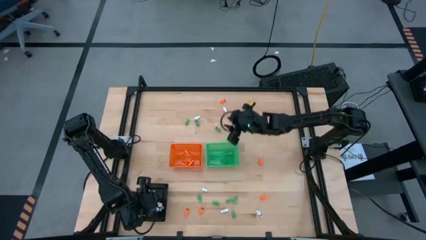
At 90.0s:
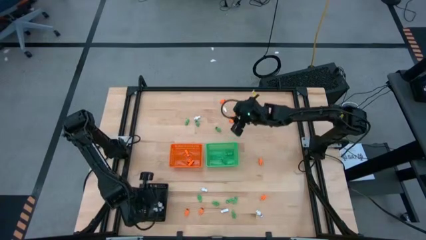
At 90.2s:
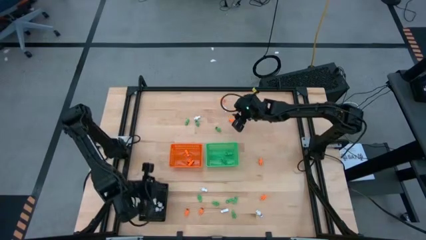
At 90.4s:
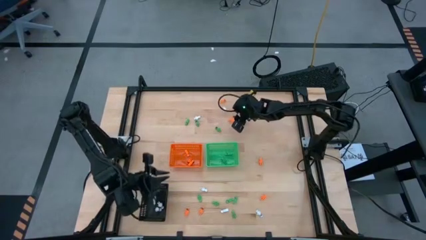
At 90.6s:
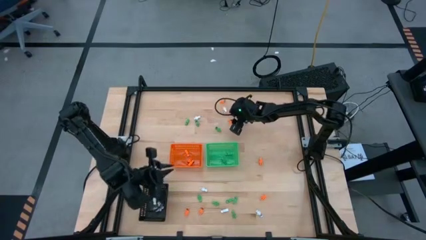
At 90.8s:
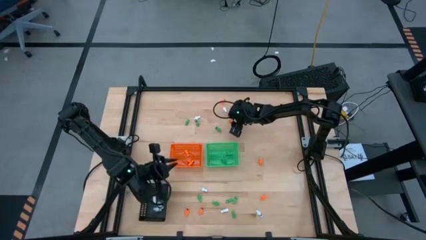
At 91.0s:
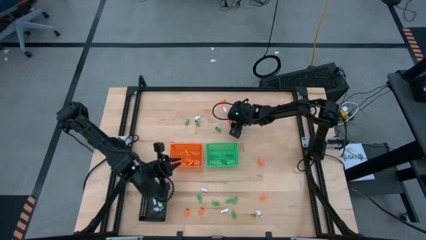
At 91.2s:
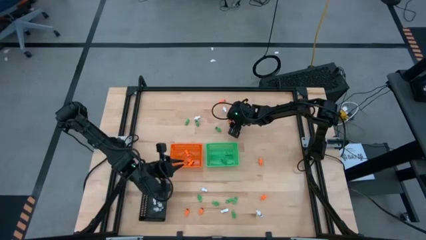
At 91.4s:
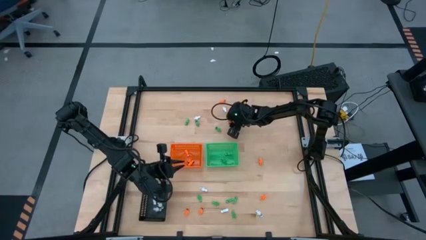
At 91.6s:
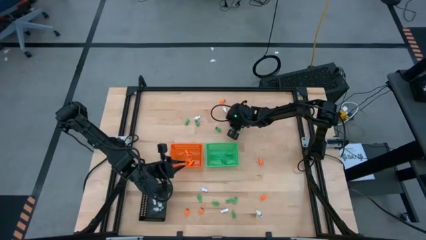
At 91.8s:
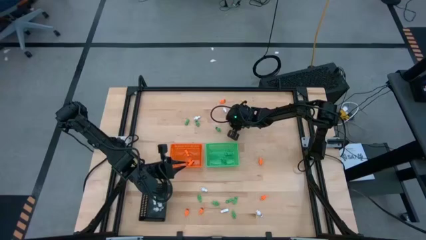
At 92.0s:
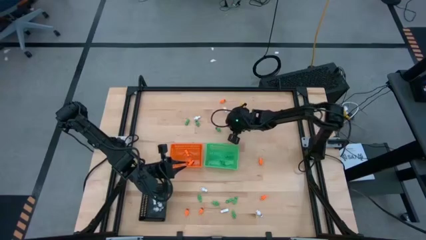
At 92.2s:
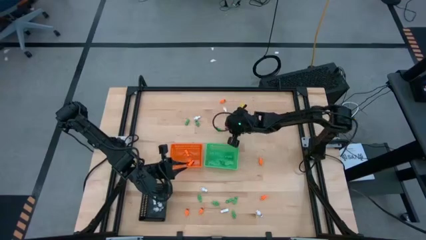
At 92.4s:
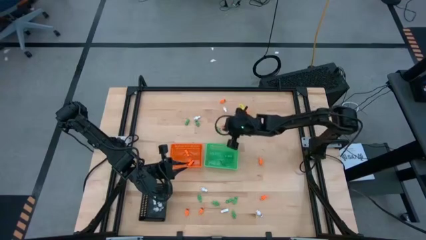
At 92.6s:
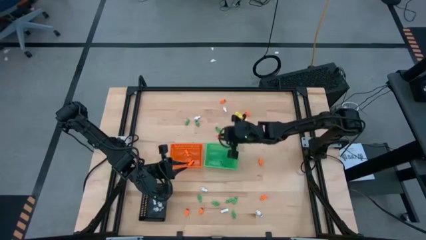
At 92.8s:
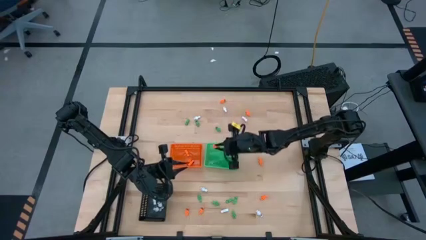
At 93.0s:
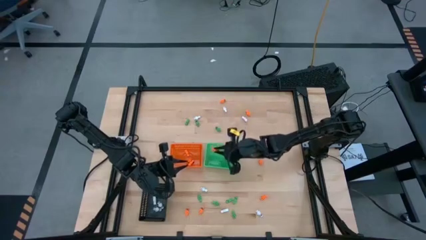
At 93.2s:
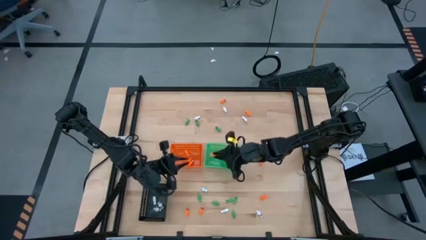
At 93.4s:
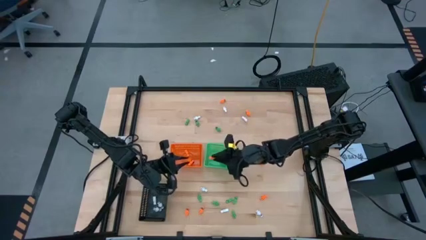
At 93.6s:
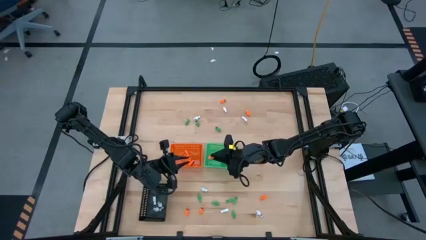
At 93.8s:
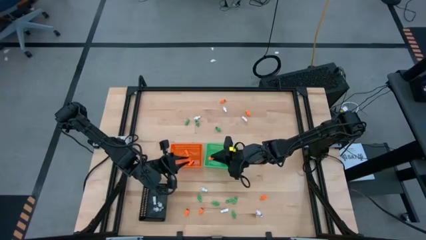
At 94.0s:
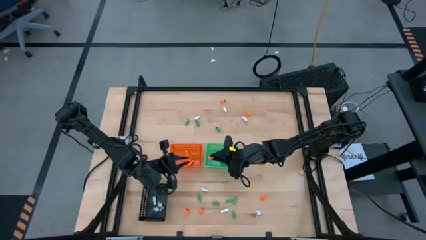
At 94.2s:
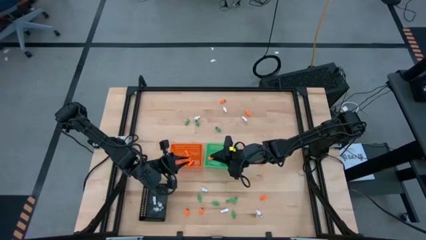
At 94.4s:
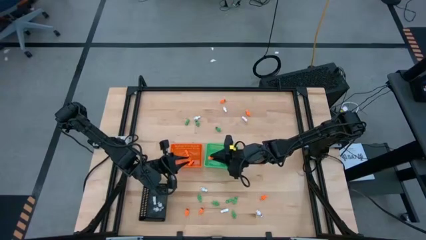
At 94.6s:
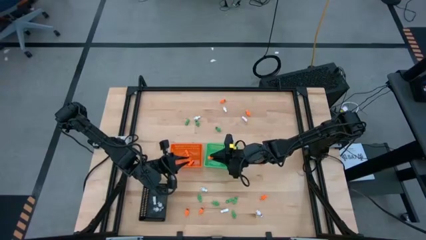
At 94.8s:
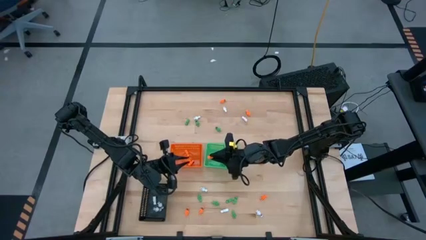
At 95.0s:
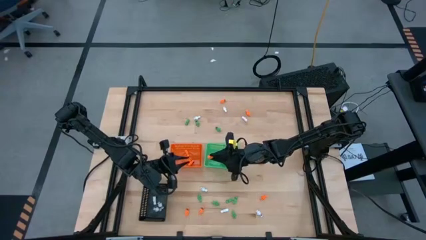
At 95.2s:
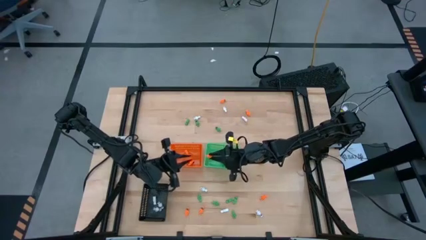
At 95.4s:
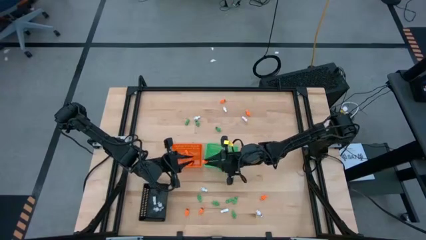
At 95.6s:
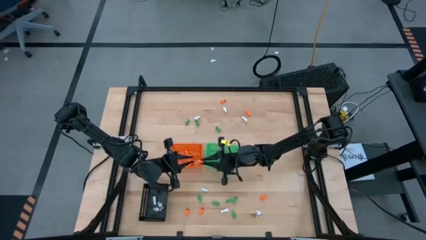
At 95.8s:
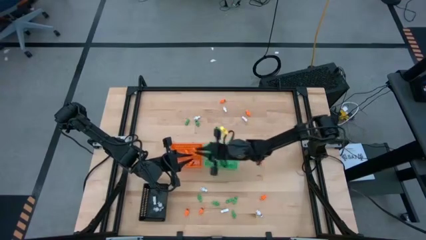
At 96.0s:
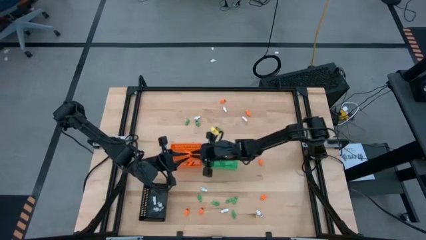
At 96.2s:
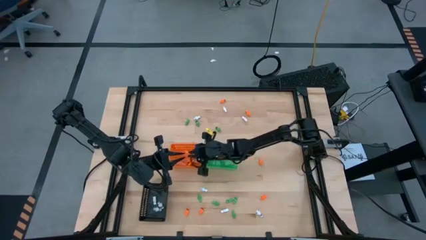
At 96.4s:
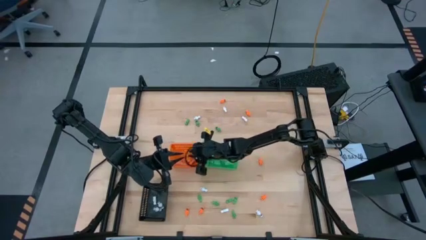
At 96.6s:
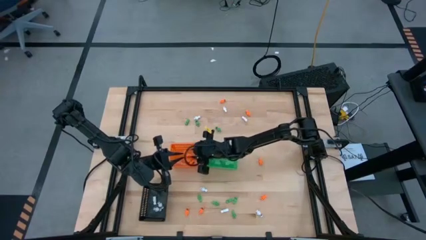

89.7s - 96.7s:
Task: Sort Halloween decoration
Put the orange skeleton toy into the orange bin

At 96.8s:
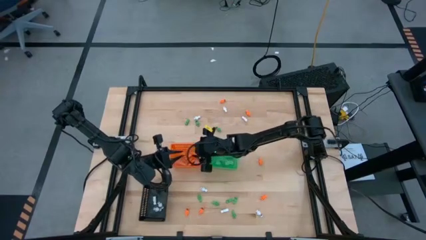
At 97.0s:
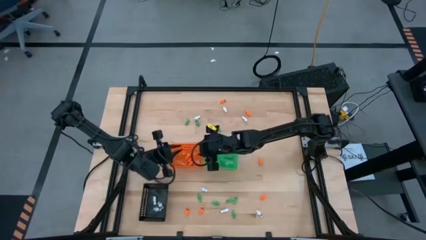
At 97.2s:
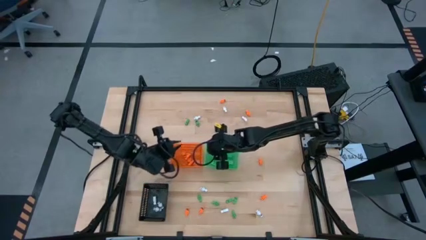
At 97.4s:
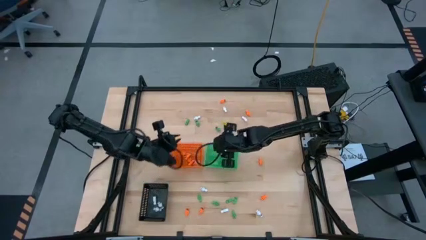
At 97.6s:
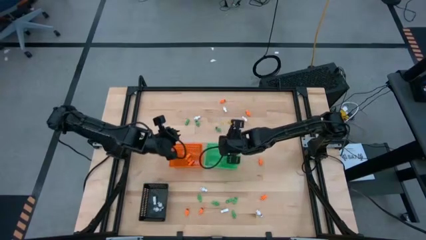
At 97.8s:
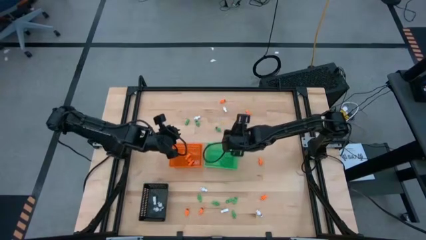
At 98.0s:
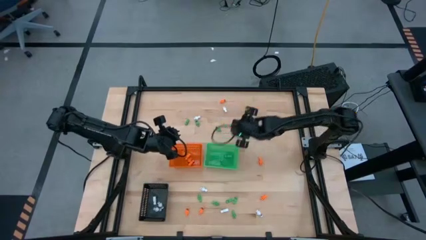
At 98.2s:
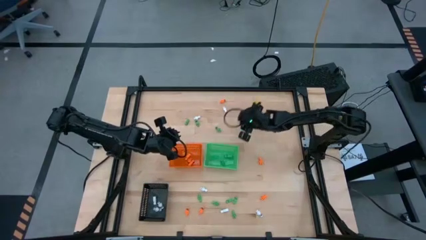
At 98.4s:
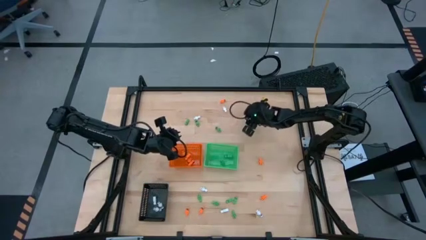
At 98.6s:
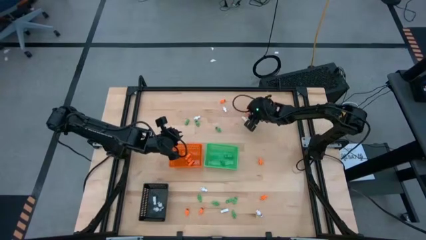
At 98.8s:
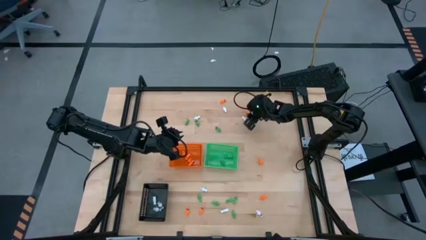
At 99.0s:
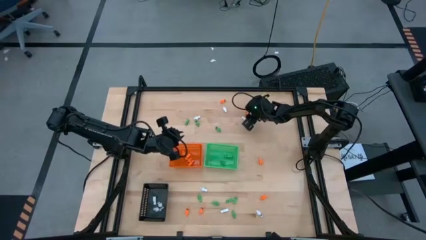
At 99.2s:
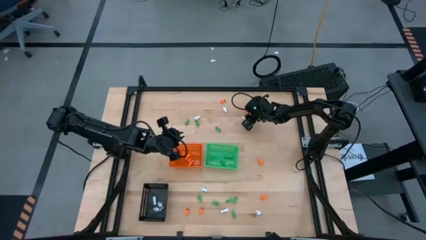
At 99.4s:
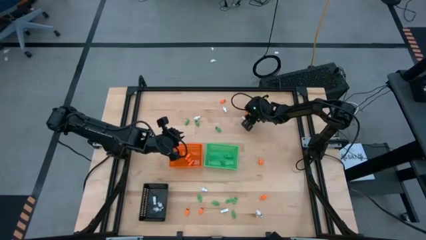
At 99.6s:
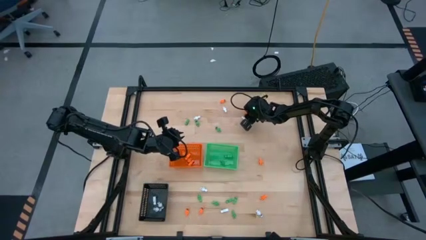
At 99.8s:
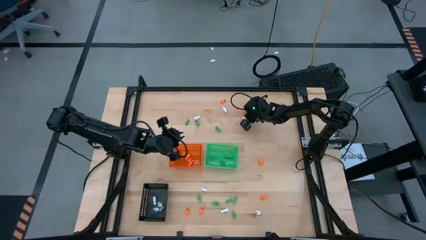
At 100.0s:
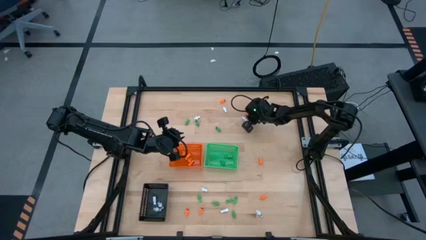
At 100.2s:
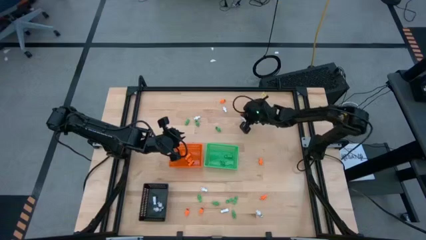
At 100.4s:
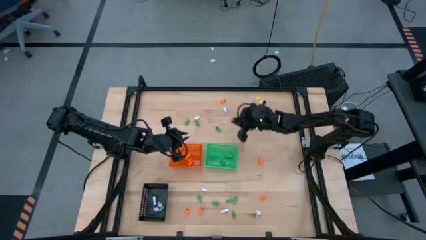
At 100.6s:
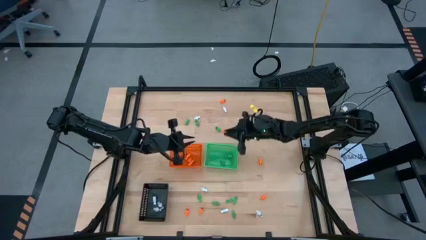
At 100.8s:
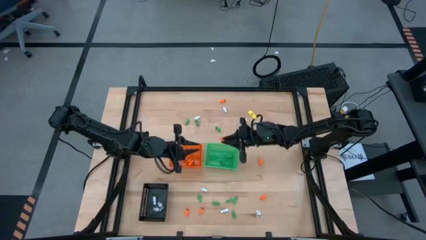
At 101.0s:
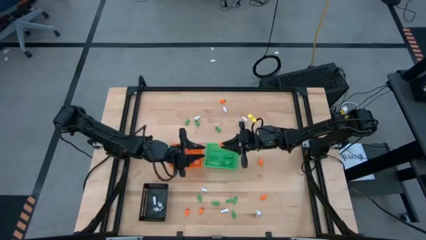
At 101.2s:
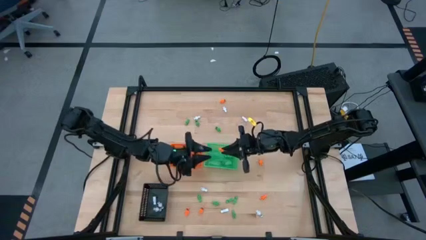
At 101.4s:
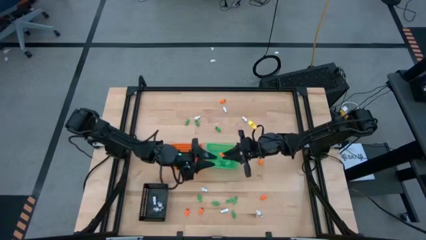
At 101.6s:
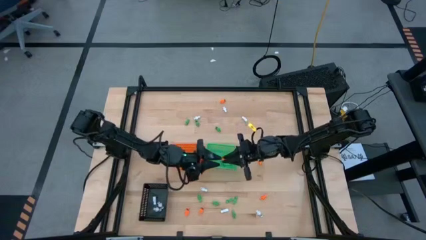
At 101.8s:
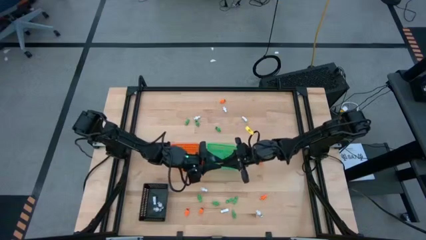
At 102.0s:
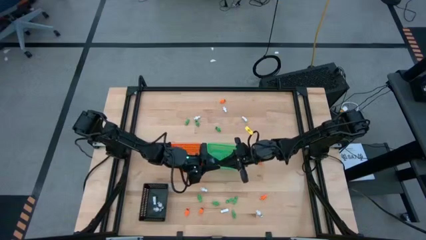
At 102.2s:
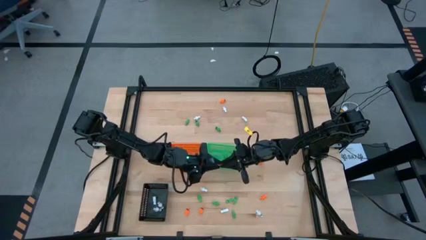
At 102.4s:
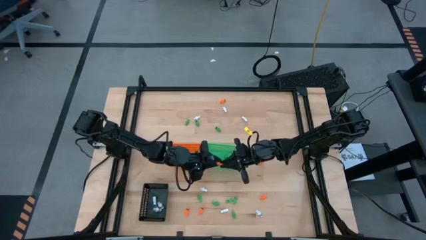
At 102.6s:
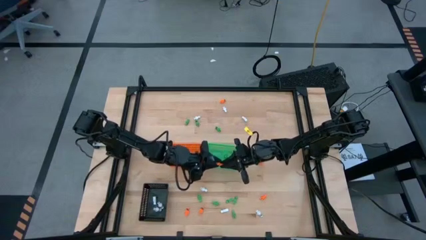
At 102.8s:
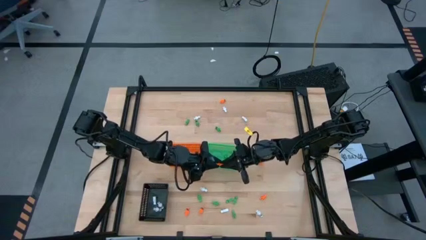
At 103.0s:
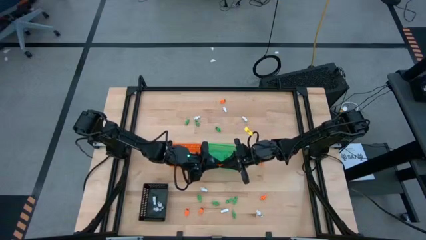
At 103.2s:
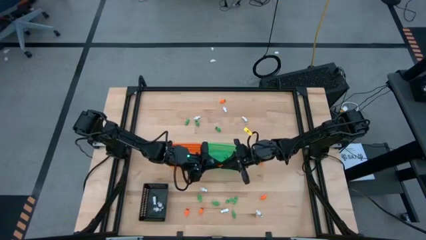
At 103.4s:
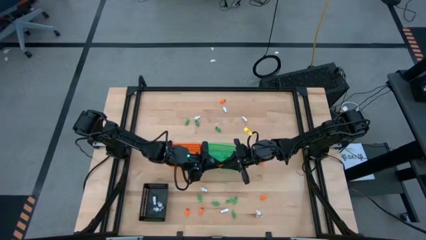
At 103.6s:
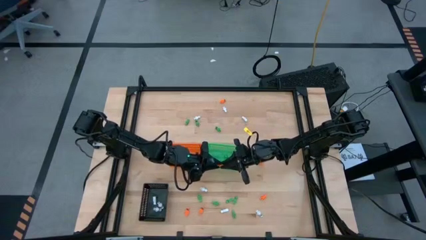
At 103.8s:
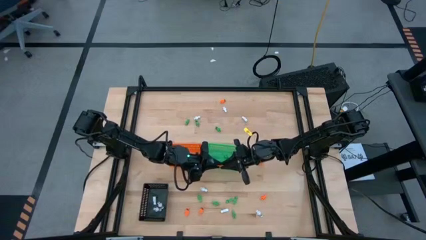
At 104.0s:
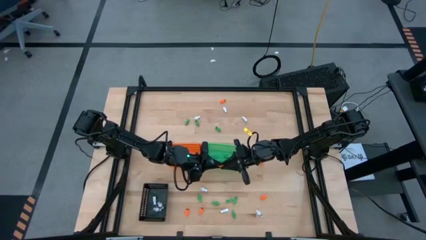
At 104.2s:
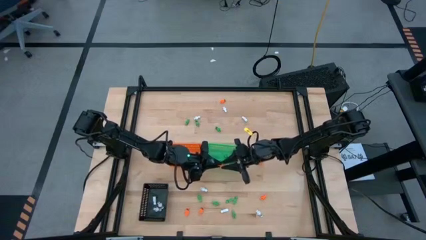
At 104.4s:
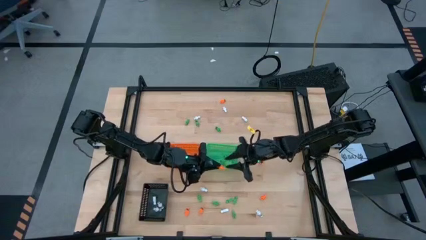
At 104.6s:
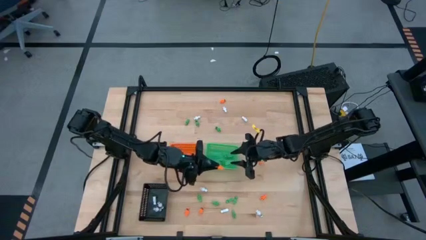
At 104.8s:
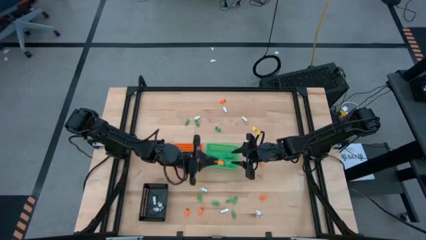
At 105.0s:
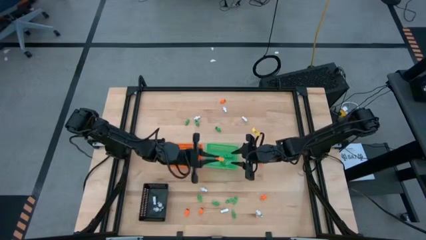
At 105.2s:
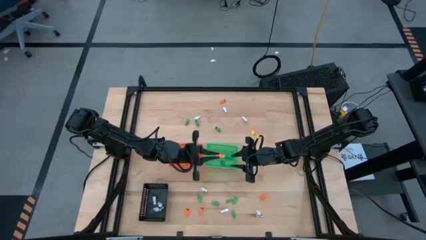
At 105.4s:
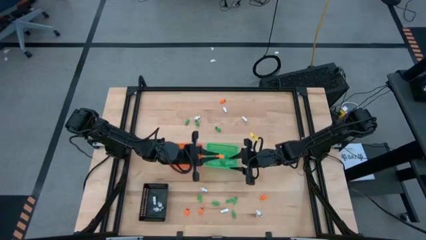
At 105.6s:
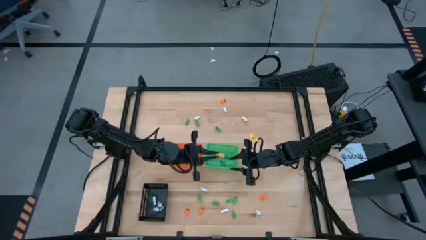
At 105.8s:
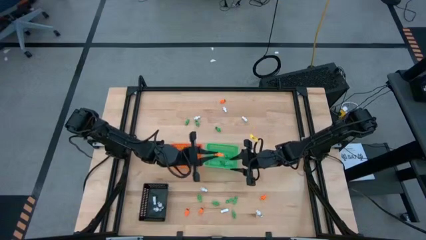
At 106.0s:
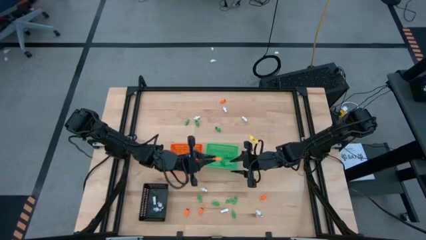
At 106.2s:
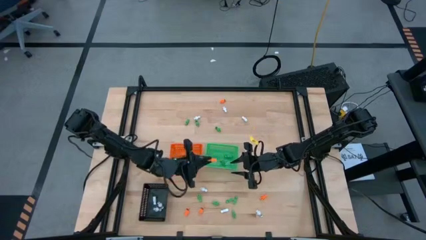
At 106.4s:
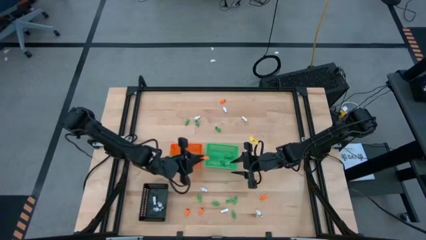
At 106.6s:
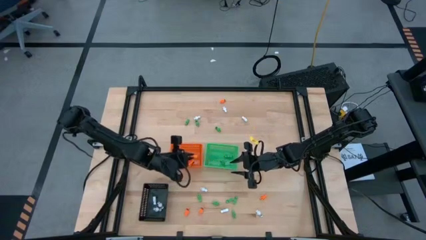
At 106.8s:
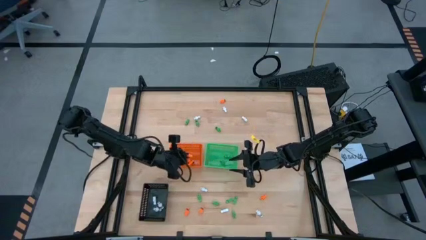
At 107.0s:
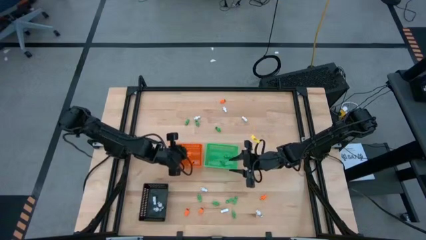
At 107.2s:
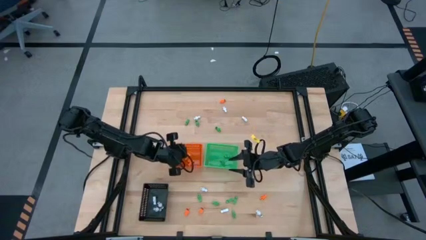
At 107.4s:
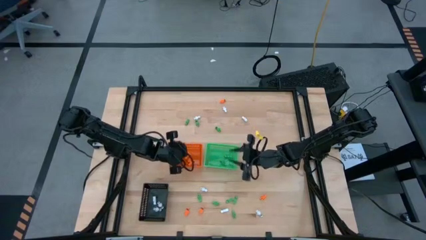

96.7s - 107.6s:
Put the orange skeleton toy into the orange bin
